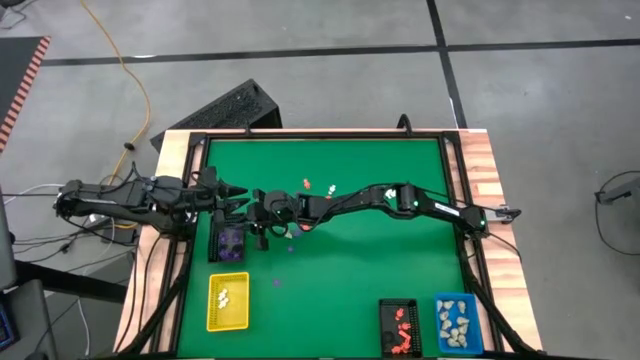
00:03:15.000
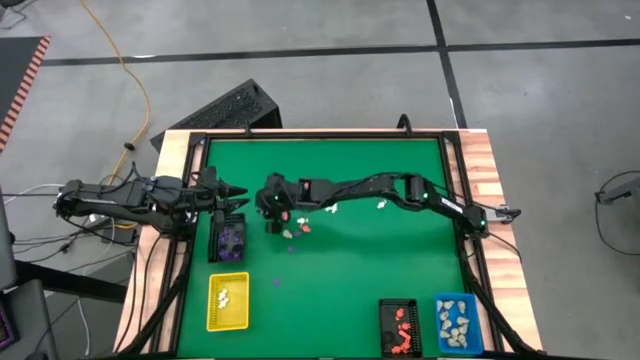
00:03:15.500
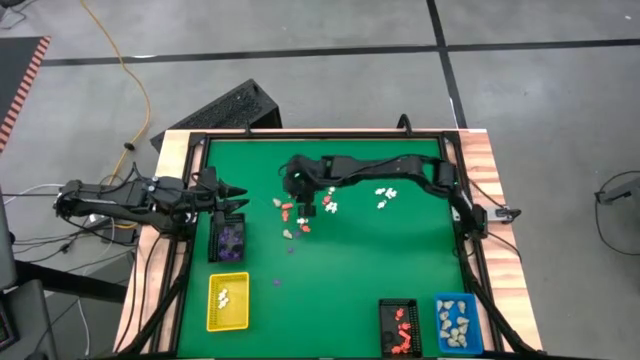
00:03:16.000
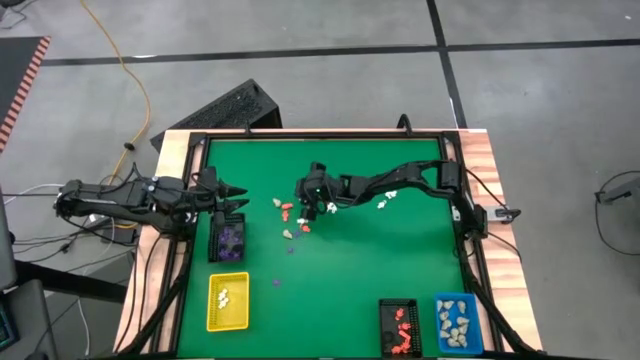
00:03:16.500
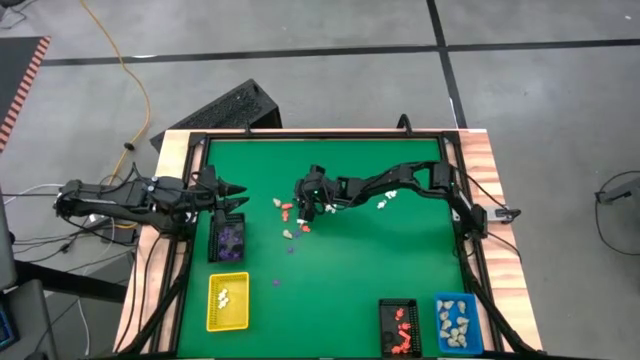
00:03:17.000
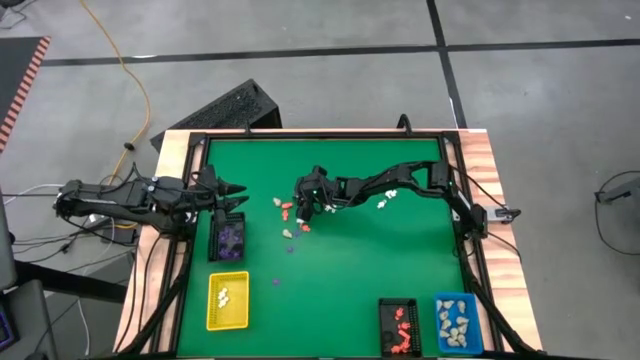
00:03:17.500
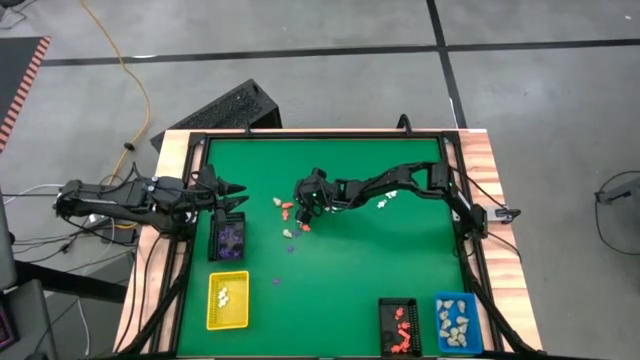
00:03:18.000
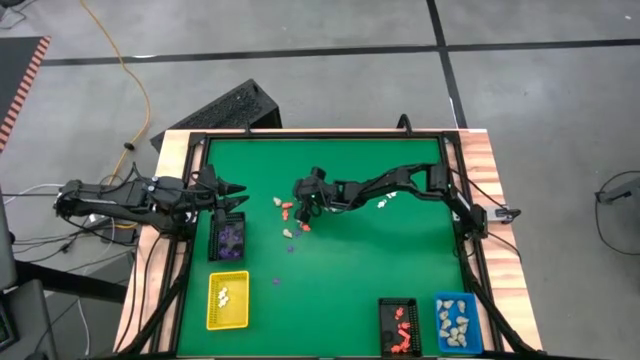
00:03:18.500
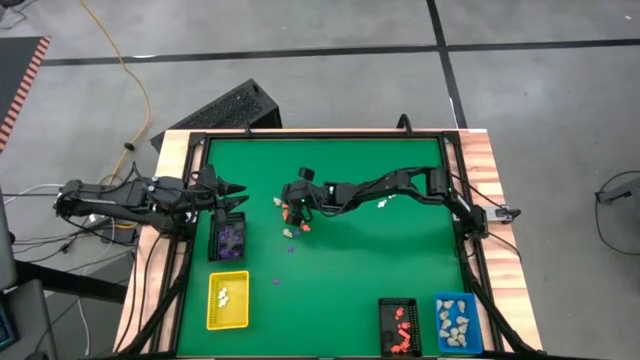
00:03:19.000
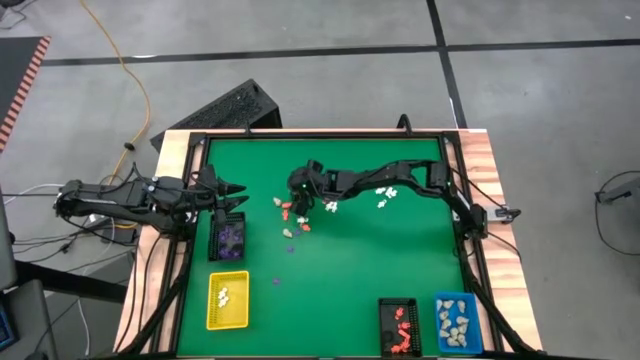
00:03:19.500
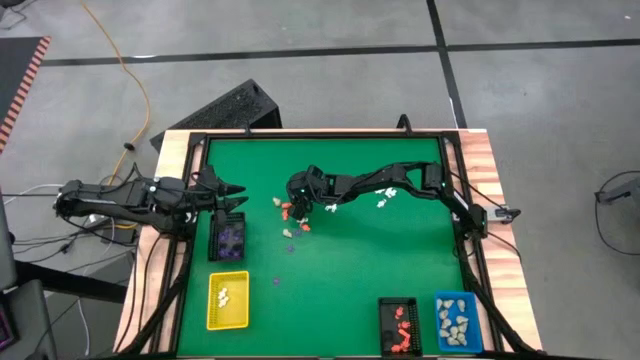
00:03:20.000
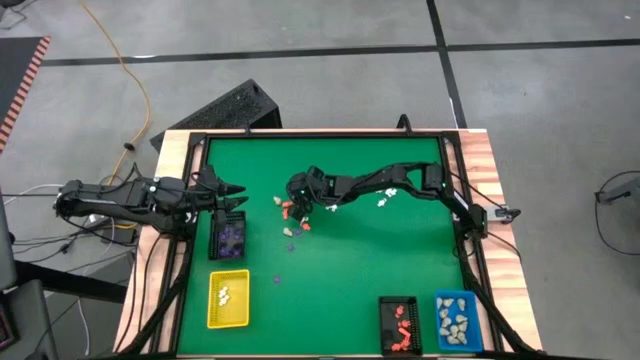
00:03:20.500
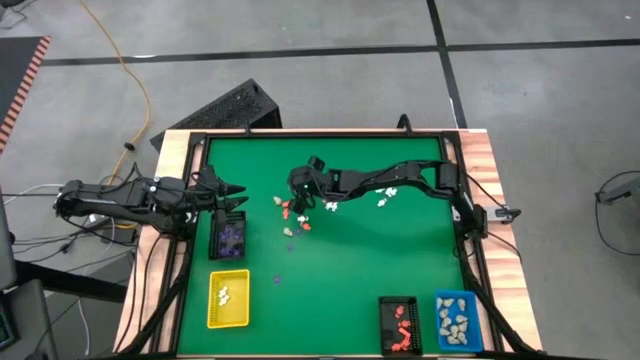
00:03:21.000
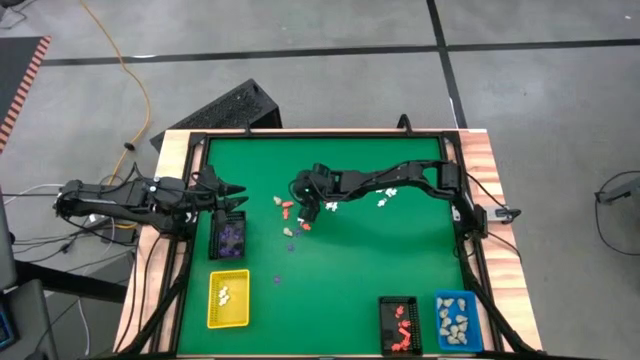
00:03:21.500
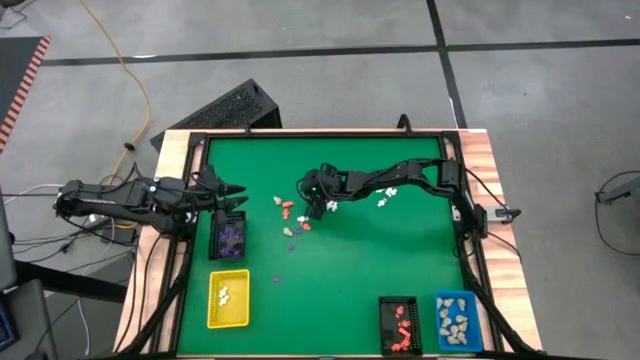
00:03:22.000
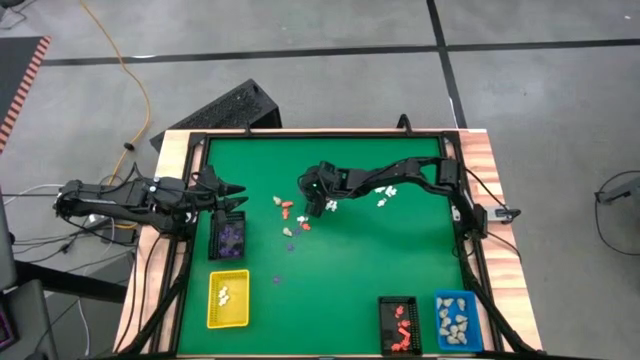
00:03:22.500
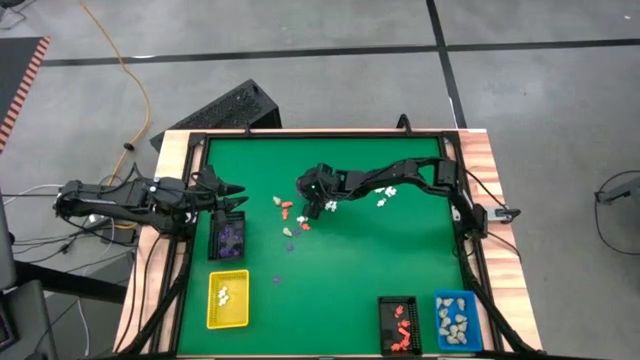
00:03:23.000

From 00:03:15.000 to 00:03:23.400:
Task: Sort Halloween decoration
Put the purple spider toy into the top black basket

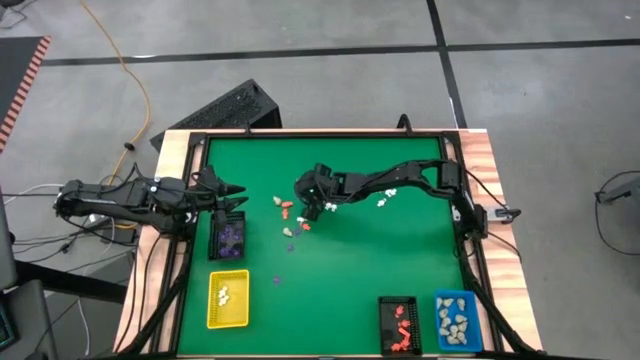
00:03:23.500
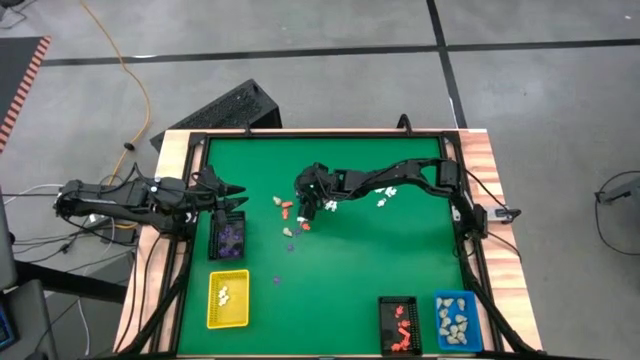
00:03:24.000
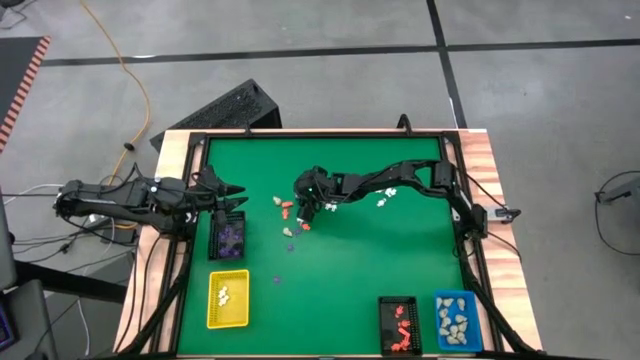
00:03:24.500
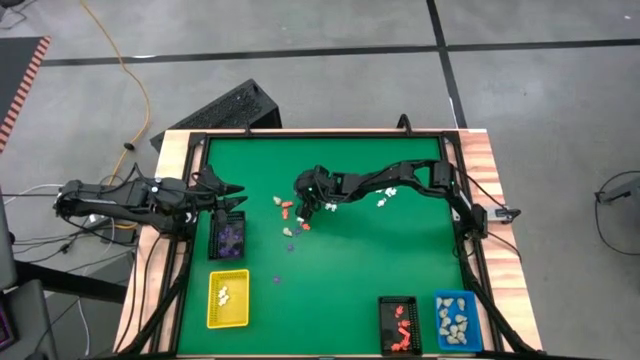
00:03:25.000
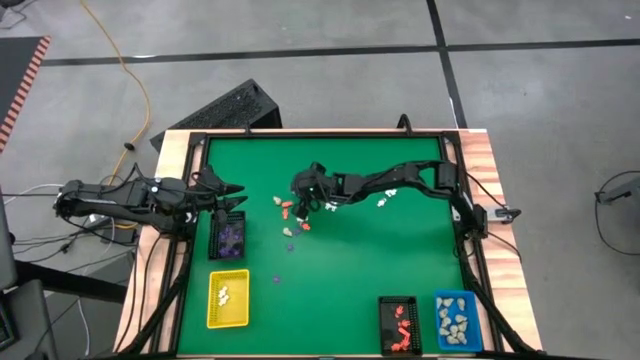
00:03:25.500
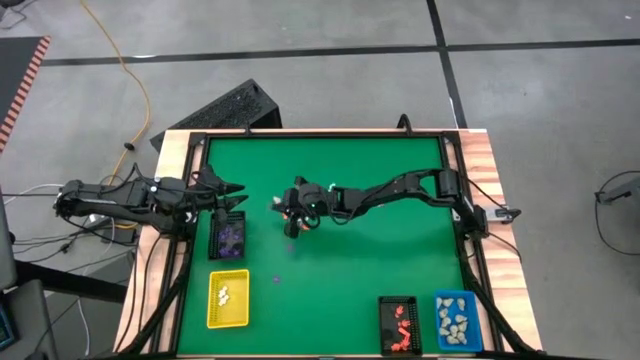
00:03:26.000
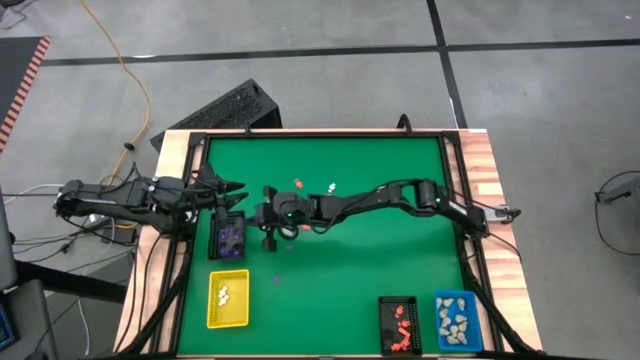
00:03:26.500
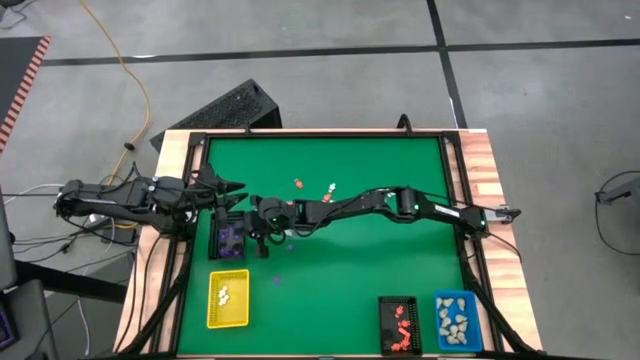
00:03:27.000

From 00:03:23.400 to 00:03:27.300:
Put the purple spider toy into the top black basket

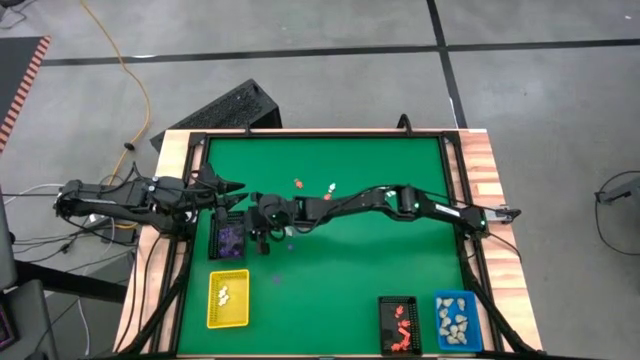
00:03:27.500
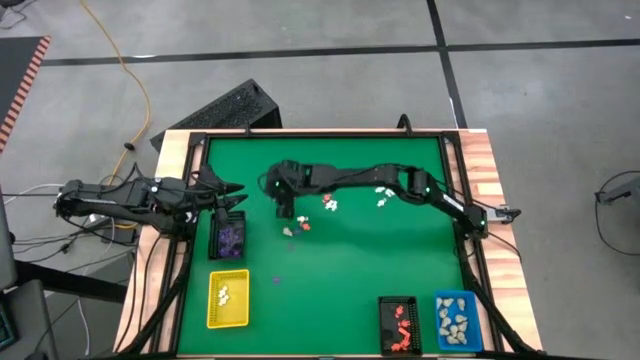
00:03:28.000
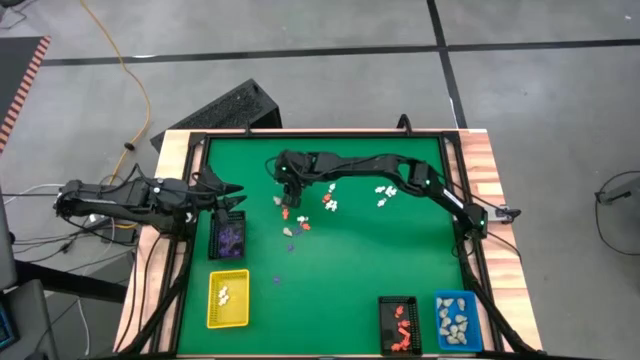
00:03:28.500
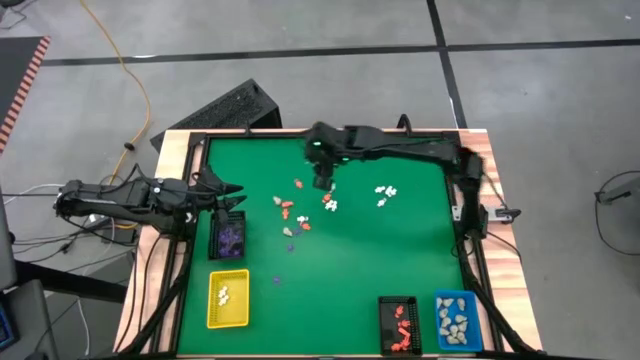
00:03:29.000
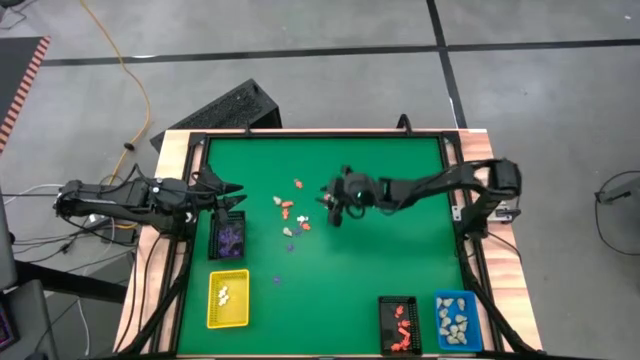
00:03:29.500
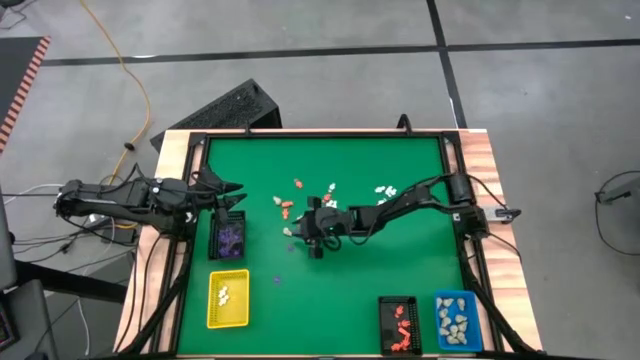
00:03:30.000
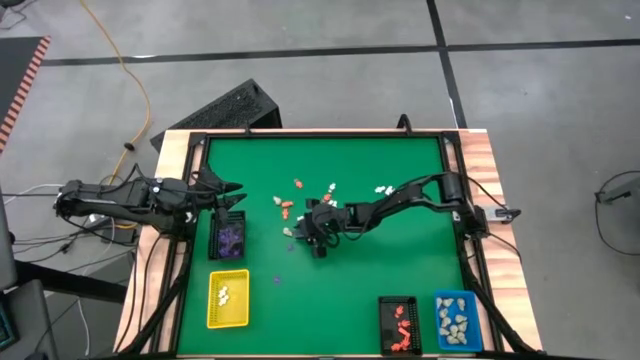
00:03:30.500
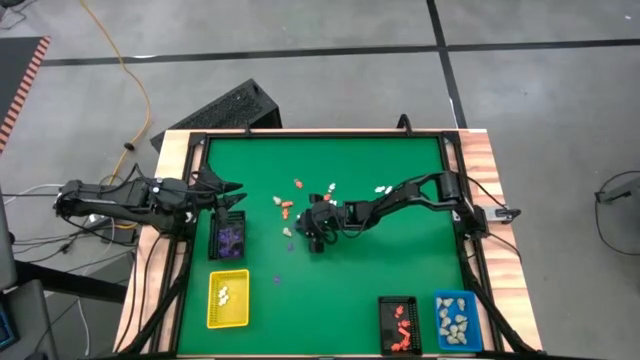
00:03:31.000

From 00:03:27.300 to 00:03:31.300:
Put the purple spider toy into the top black basket

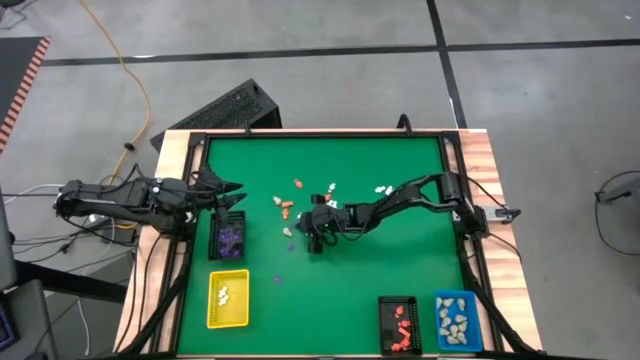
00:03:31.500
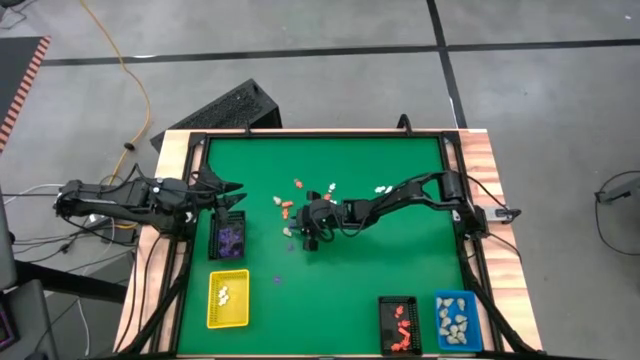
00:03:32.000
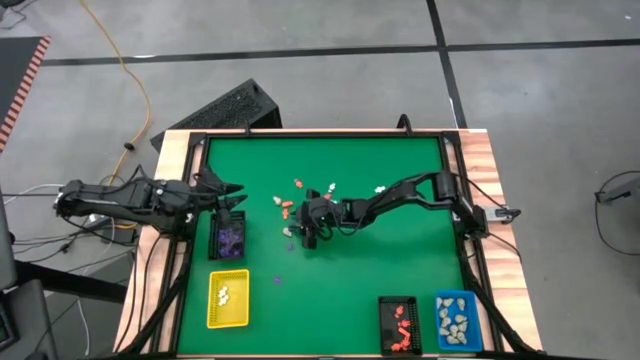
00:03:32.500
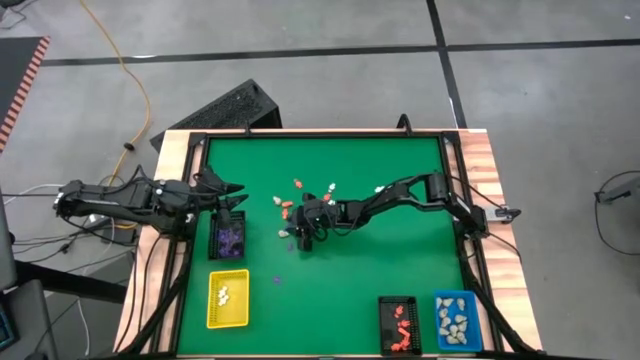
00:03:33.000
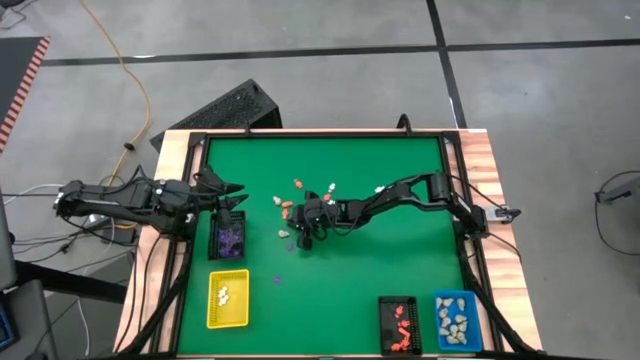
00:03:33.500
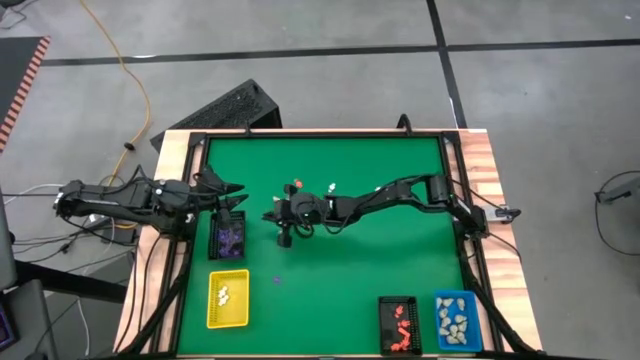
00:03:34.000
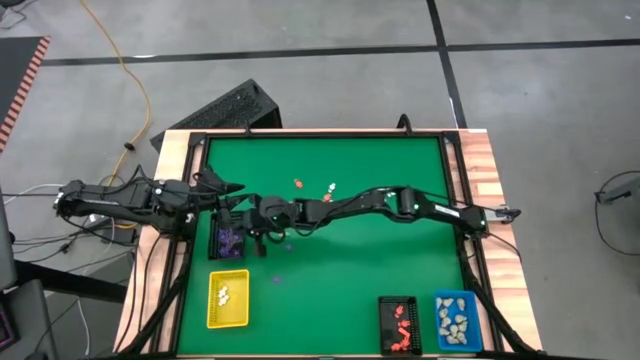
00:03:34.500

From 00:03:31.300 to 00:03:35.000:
Put the purple spider toy into the top black basket

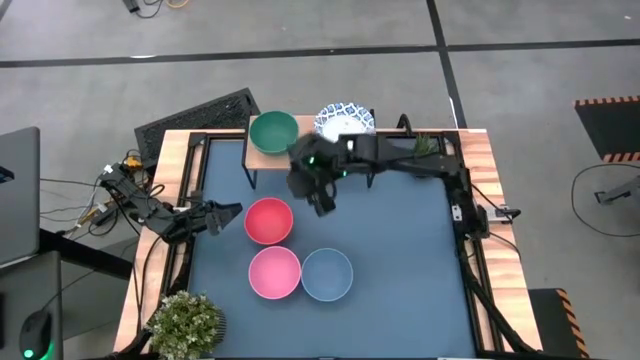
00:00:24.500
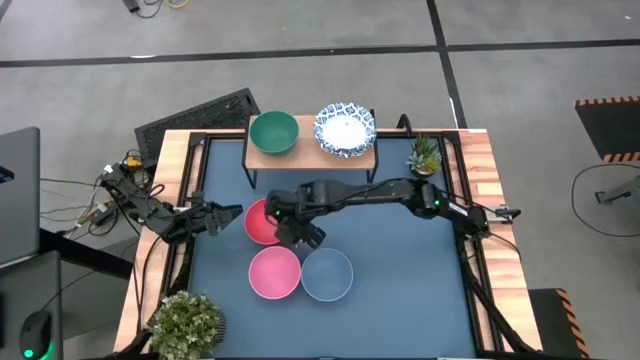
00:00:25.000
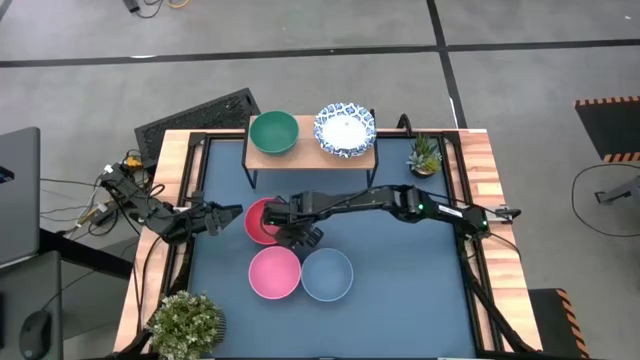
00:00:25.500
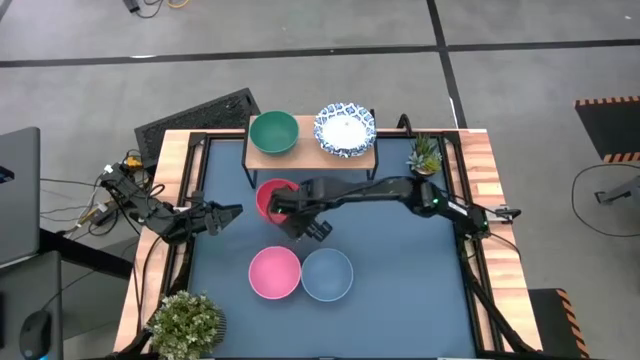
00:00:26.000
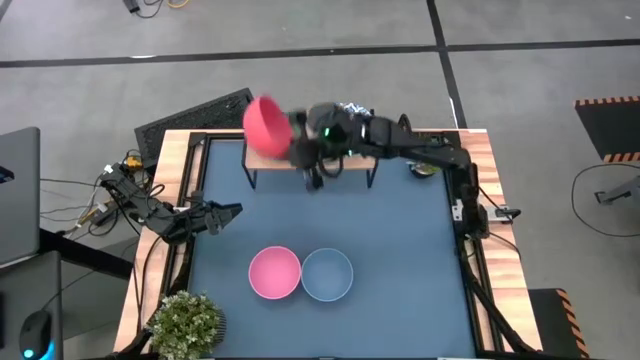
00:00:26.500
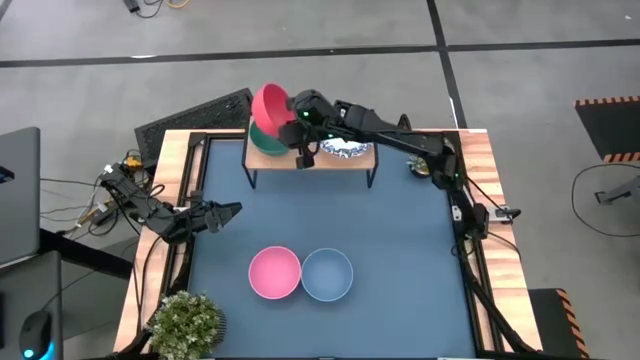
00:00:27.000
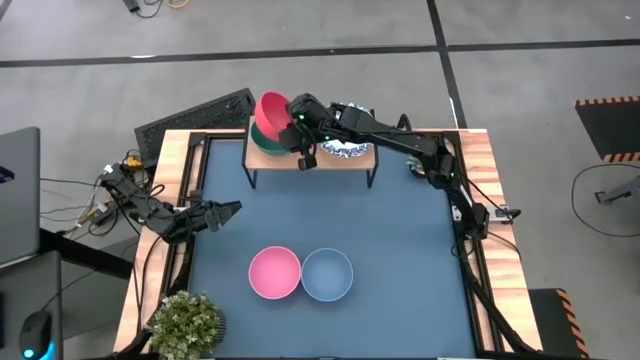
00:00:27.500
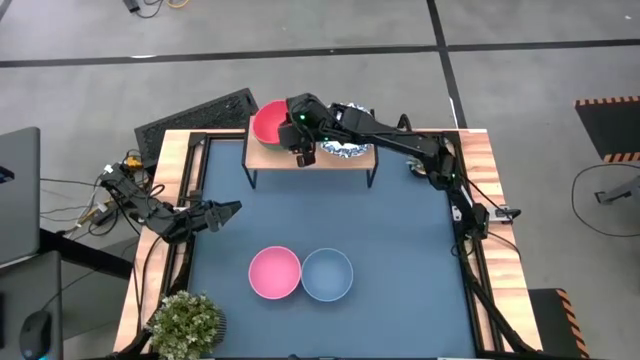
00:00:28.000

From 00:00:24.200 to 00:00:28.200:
Task: Place and stack bowls onto a shelf
Stack the orange bowl on top of the green bowl on the shelf
